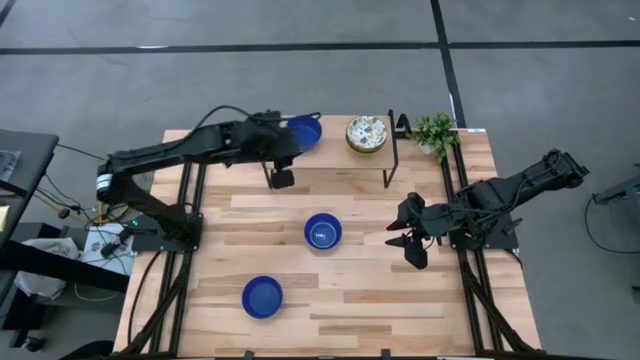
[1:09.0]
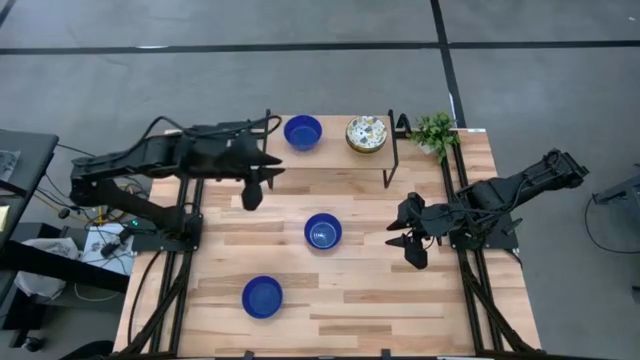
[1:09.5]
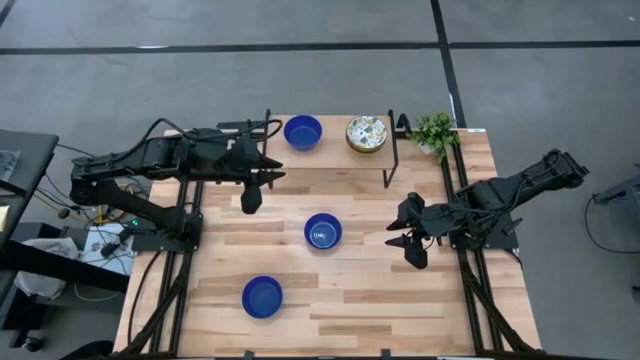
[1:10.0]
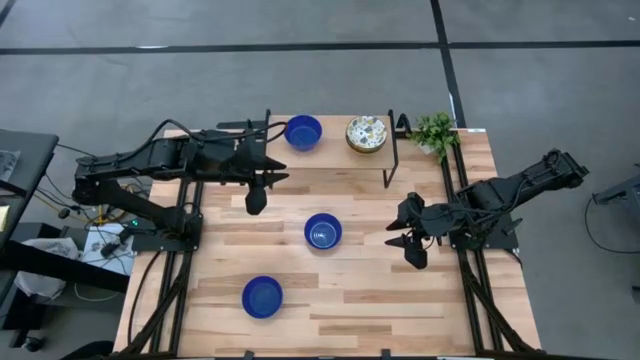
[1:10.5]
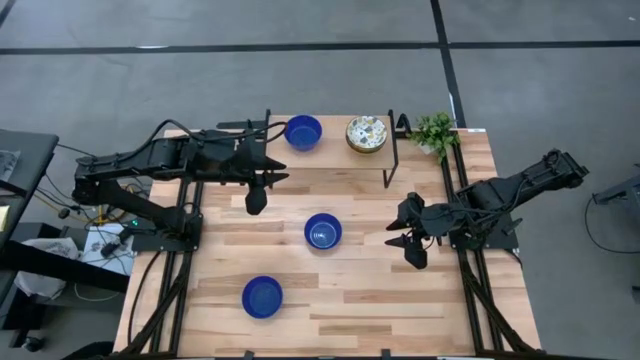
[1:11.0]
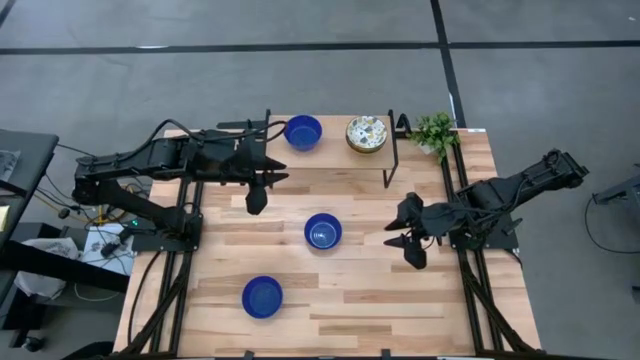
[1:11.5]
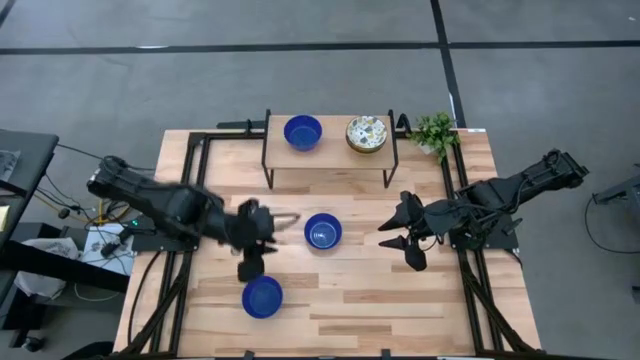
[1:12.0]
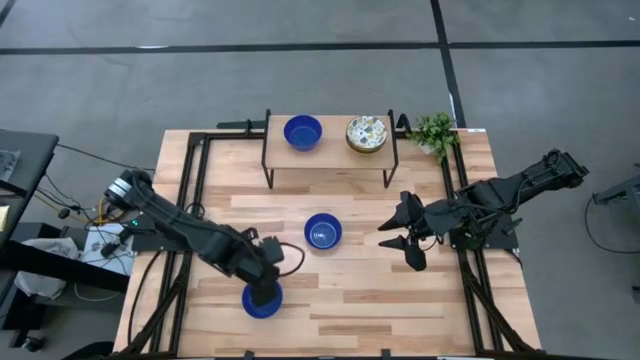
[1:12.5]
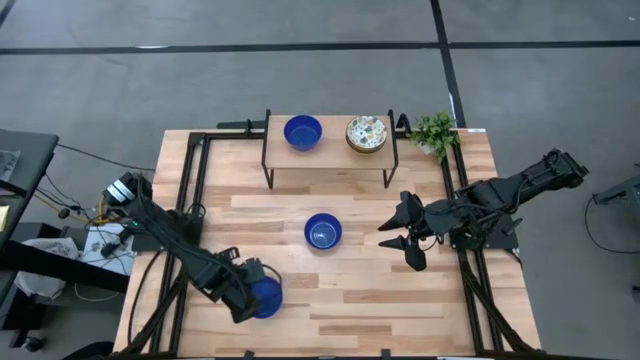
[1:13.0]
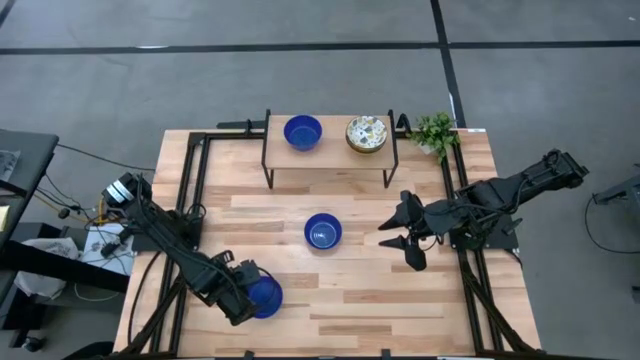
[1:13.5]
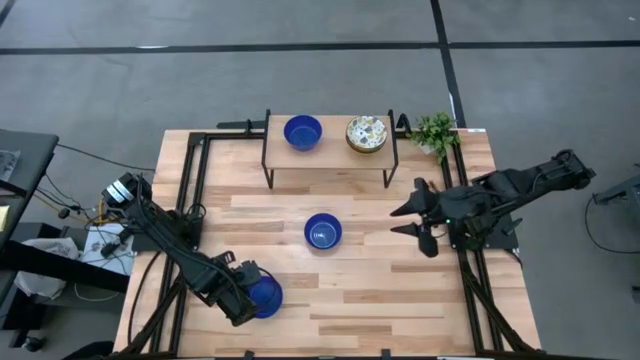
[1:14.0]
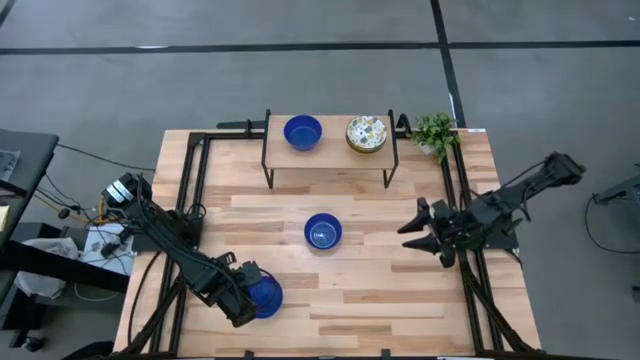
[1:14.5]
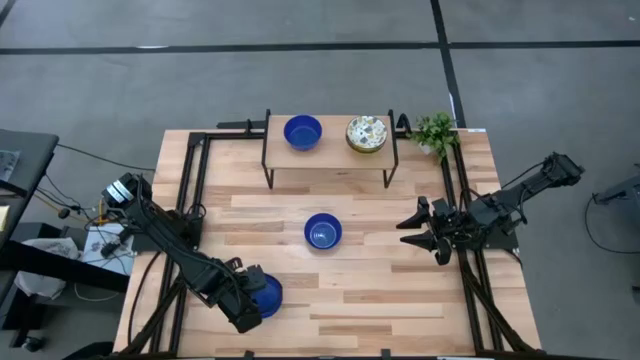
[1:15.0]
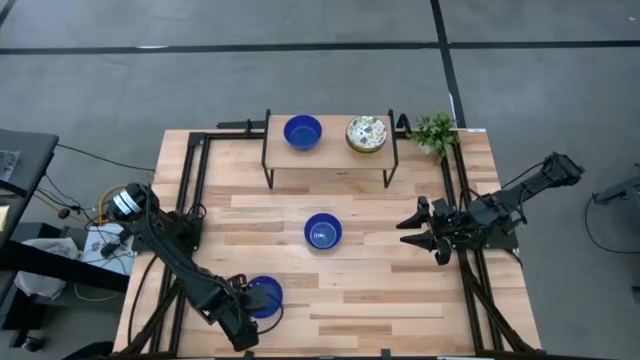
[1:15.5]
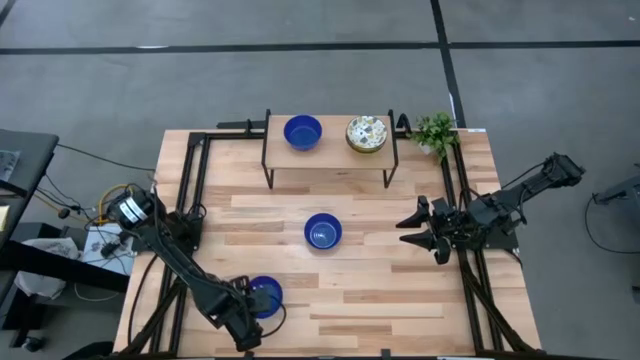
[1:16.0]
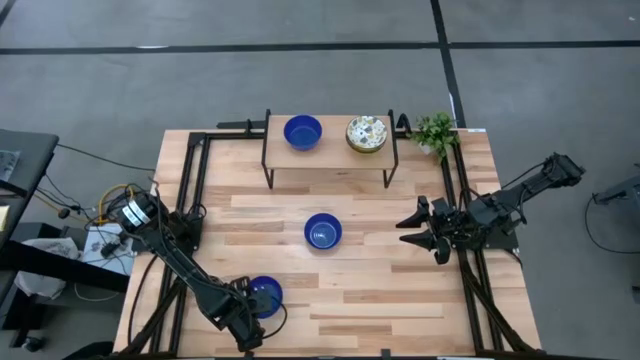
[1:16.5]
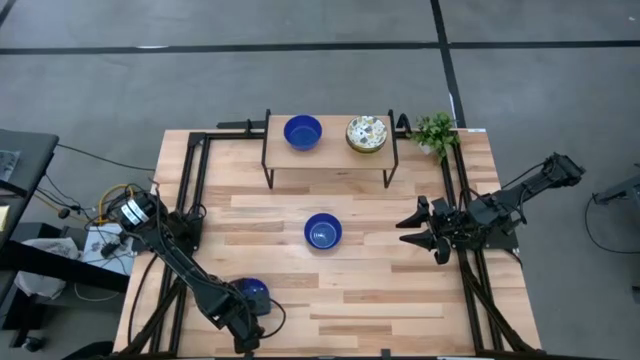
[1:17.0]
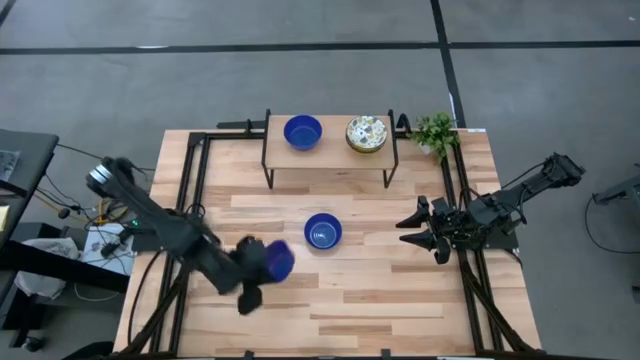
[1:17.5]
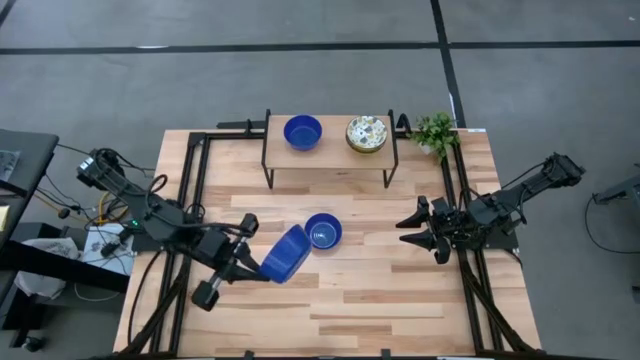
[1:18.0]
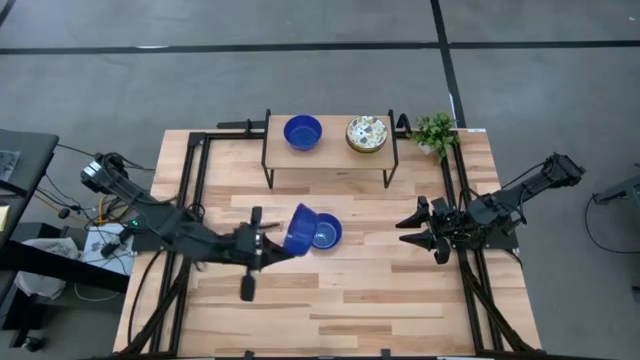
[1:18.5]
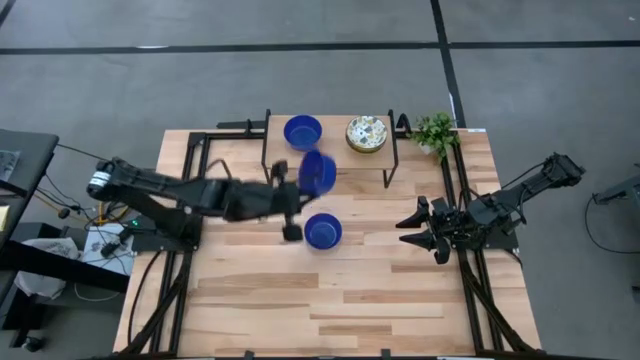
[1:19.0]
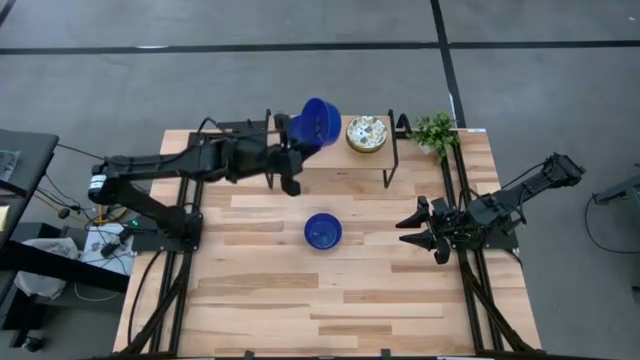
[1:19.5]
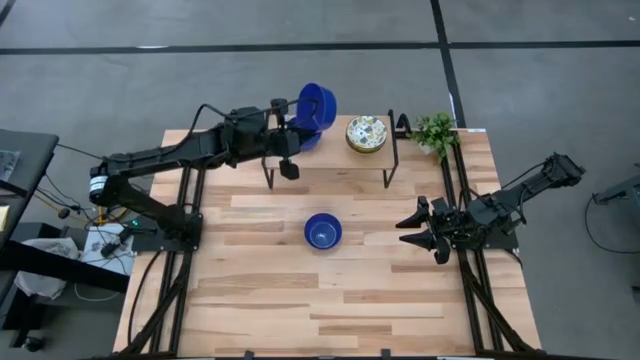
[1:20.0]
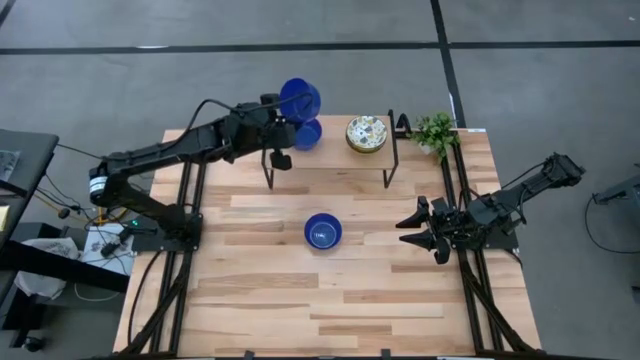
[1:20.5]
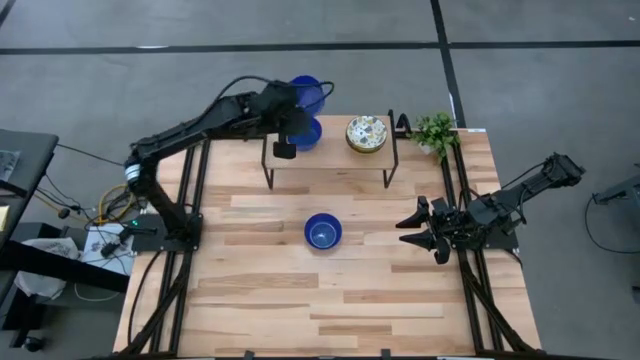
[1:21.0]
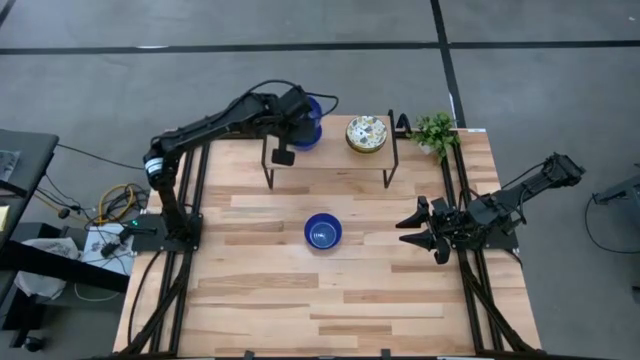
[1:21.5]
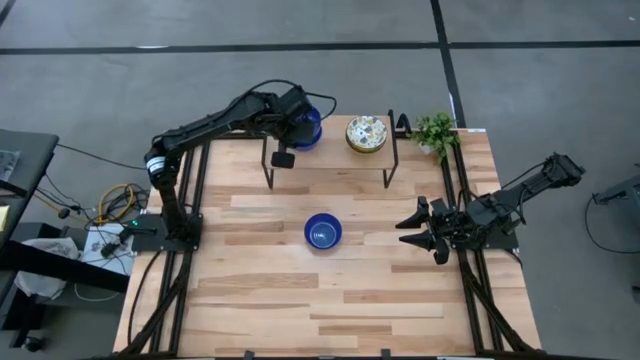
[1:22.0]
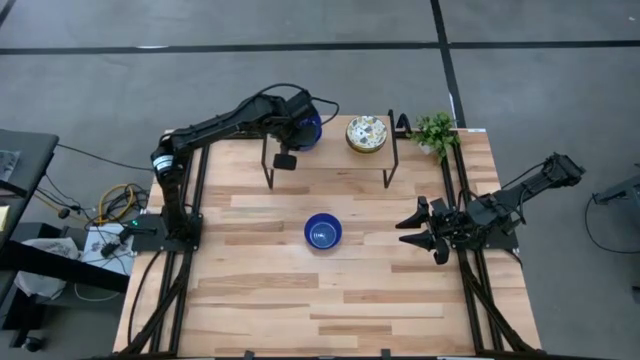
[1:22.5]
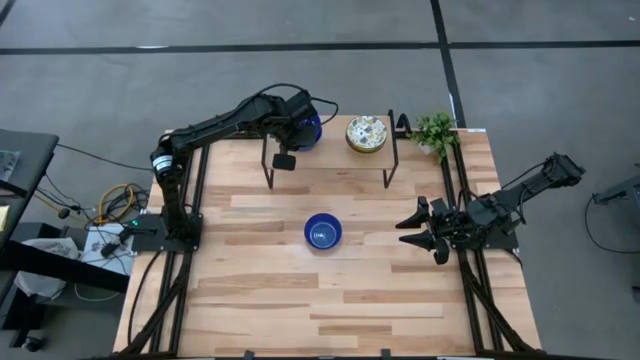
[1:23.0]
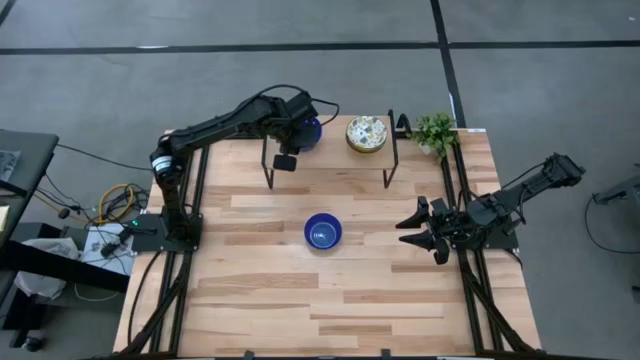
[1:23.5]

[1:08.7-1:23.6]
Task: Pick & Place Mini bowls
Stack the bottom blue bowl on top of the other blue bowl on the shelf

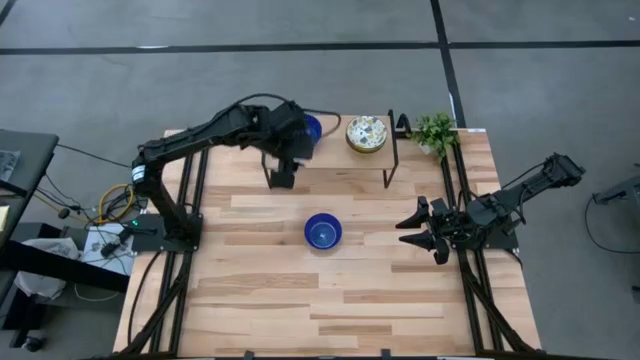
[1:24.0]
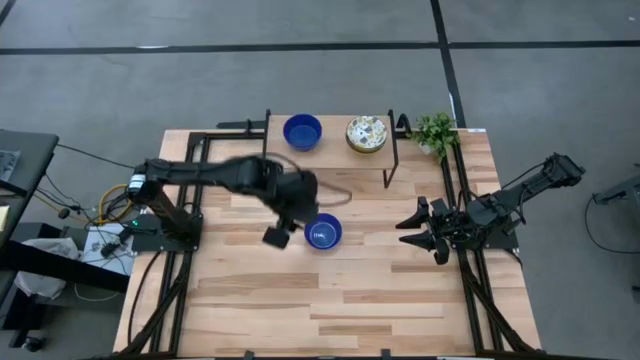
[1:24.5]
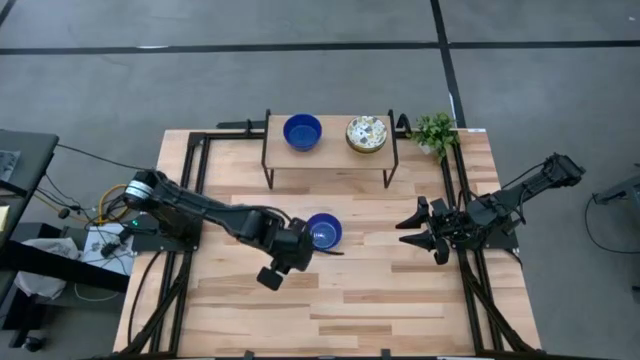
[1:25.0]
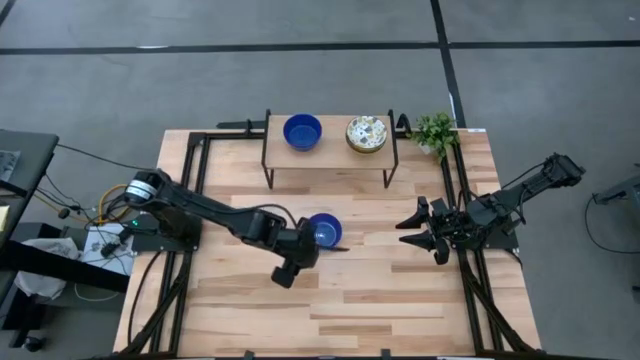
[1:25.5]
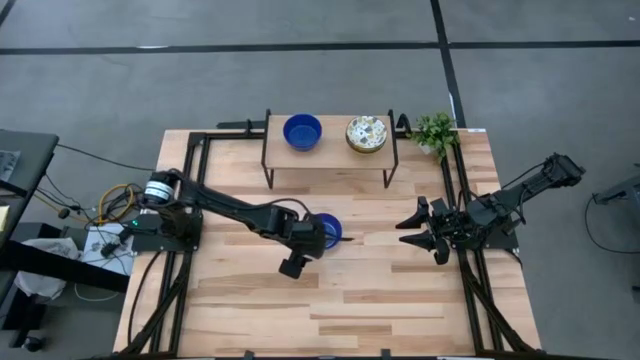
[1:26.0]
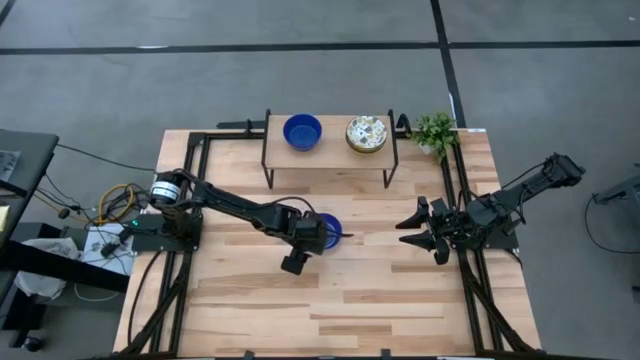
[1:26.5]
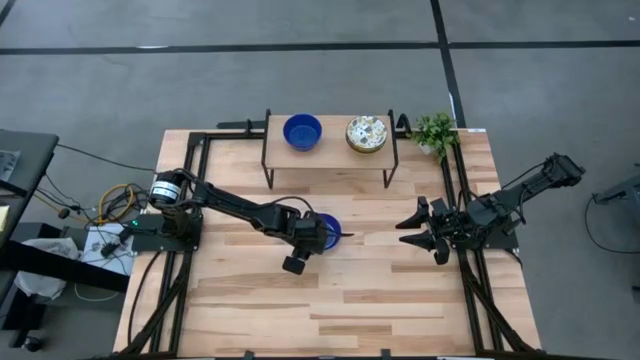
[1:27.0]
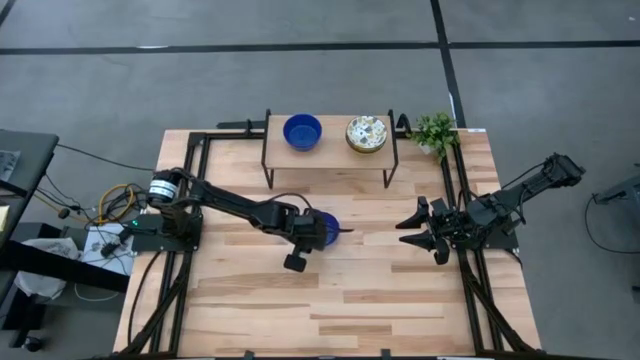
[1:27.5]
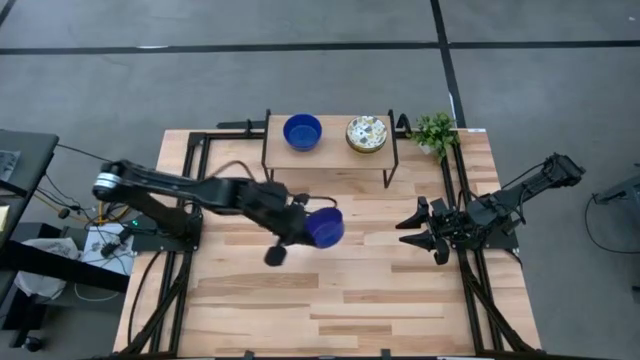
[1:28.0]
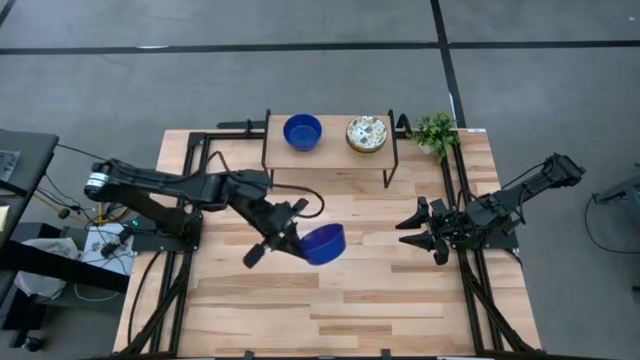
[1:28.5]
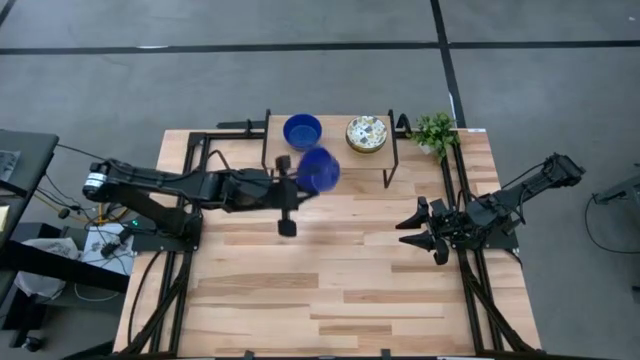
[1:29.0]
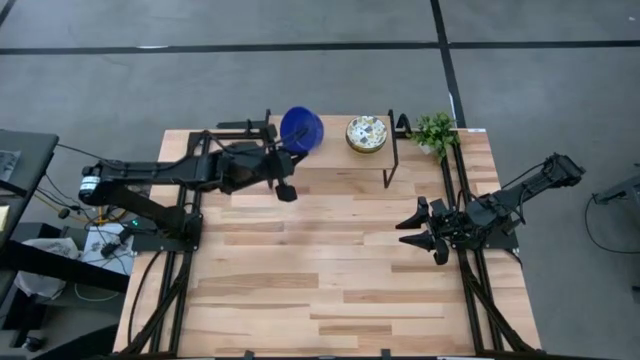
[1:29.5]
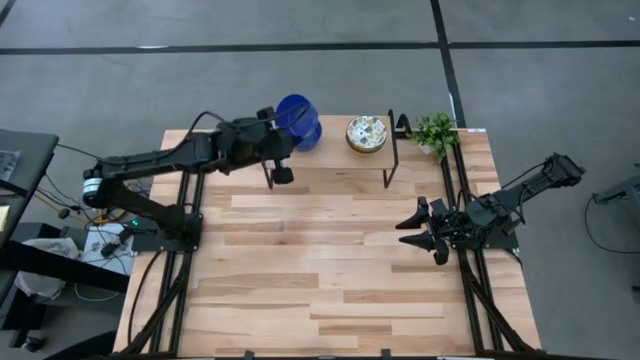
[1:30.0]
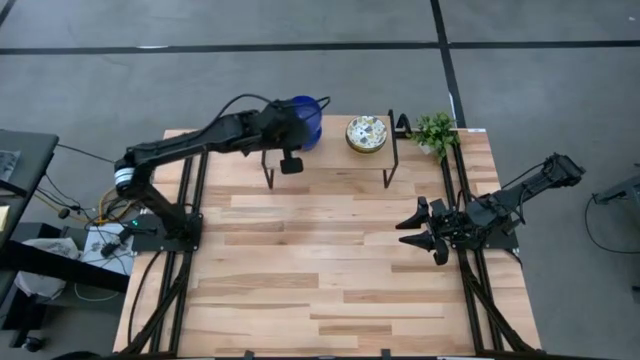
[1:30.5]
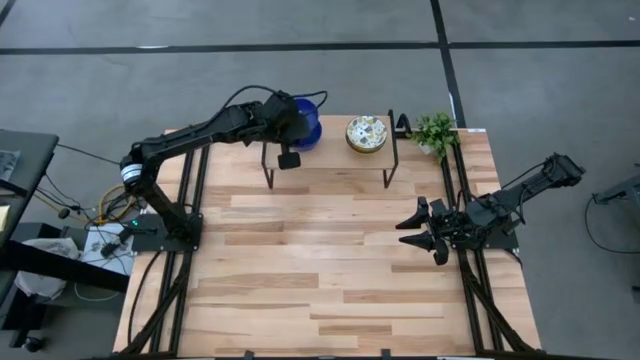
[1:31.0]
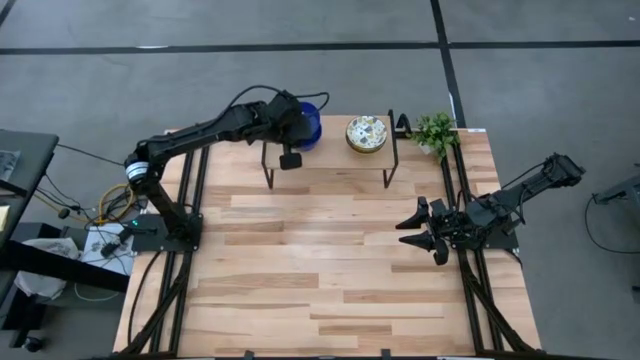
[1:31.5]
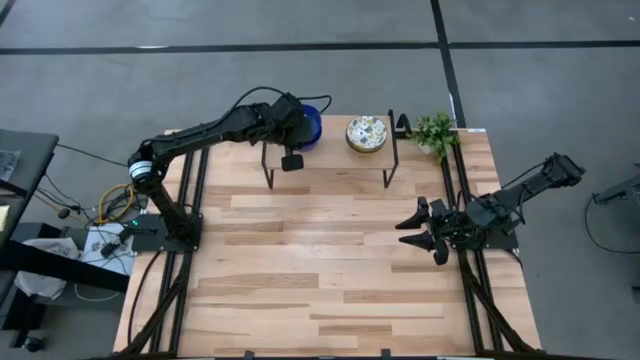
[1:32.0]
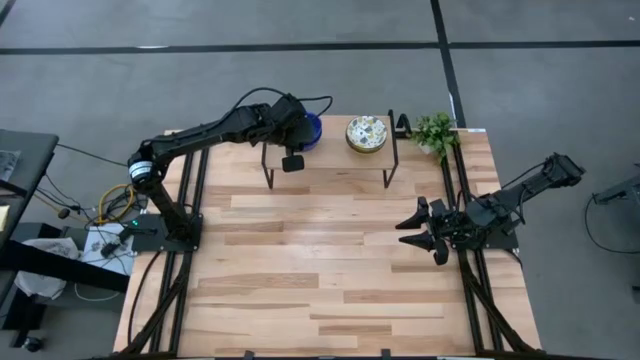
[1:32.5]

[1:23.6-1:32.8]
Stack the blue bowl on top of the stacked blue bowl on the shelf
